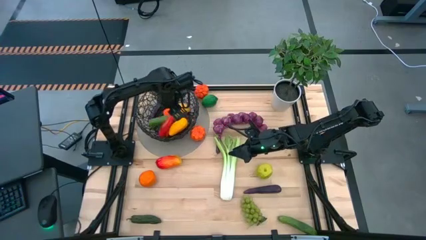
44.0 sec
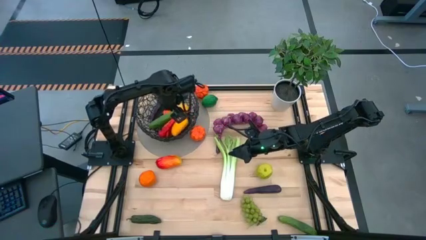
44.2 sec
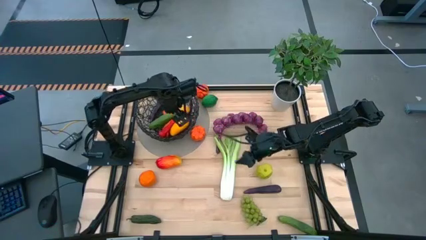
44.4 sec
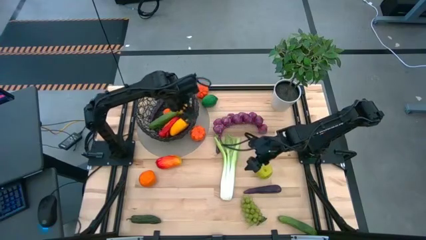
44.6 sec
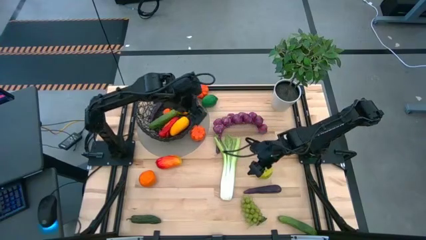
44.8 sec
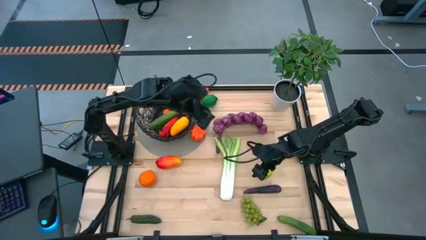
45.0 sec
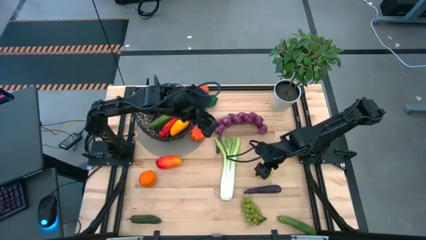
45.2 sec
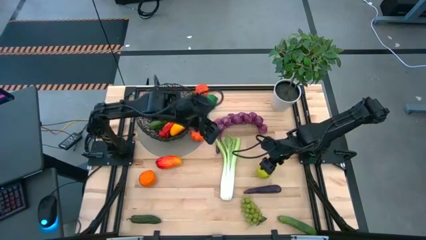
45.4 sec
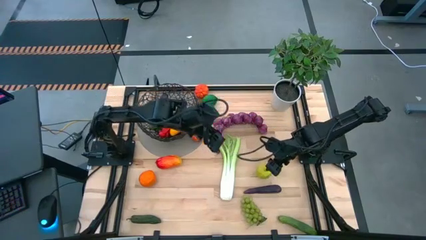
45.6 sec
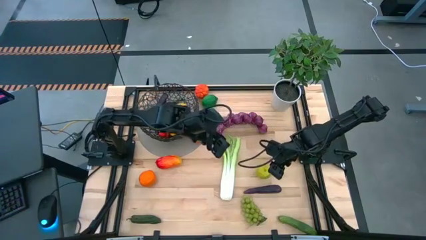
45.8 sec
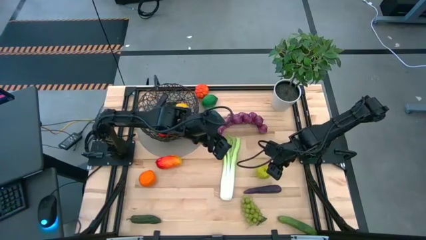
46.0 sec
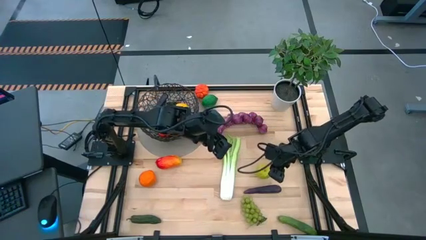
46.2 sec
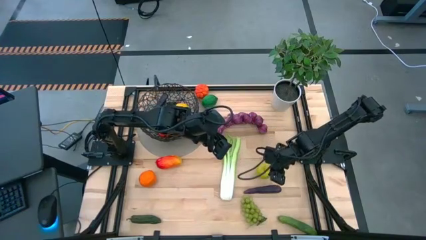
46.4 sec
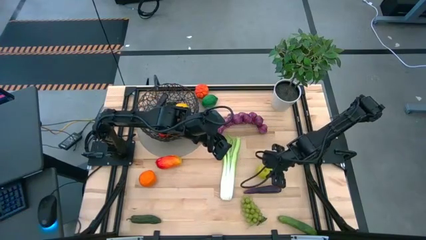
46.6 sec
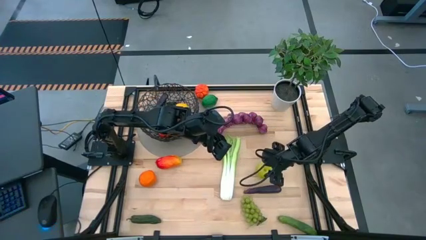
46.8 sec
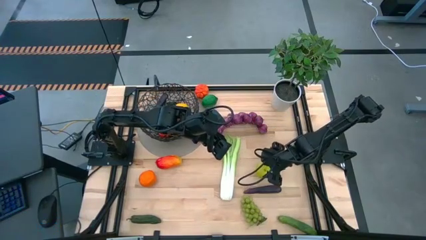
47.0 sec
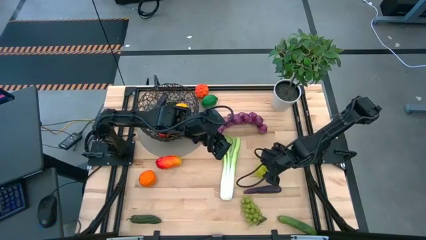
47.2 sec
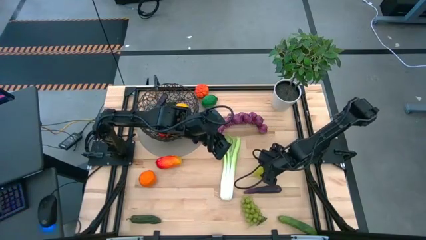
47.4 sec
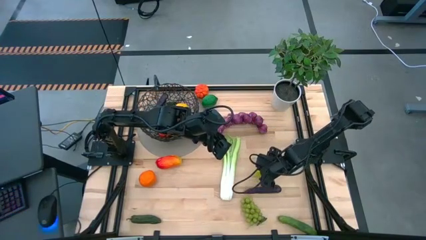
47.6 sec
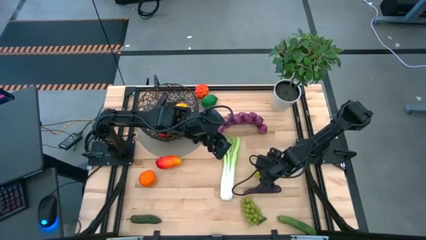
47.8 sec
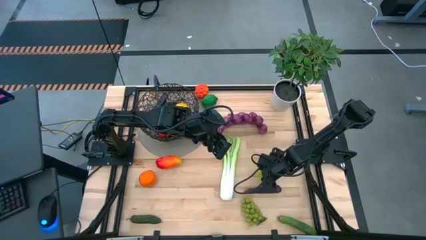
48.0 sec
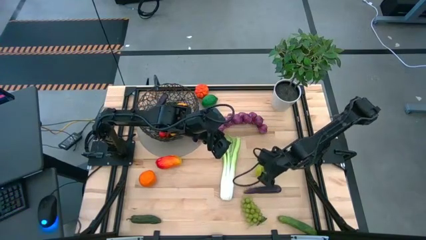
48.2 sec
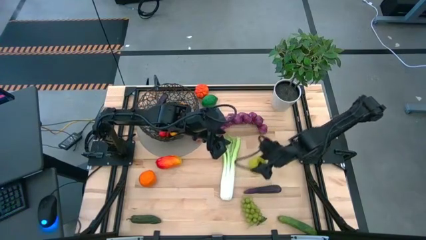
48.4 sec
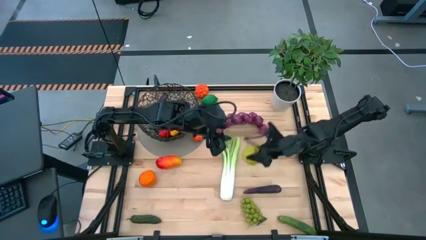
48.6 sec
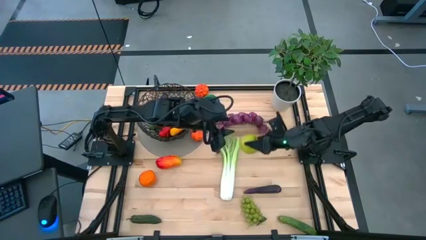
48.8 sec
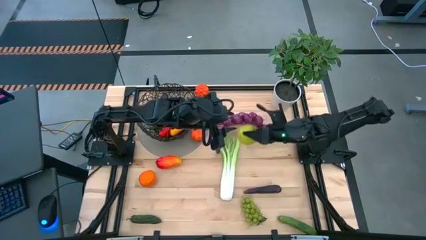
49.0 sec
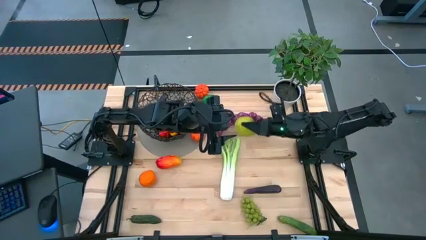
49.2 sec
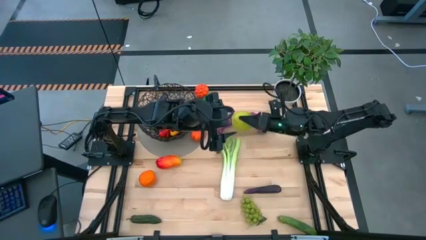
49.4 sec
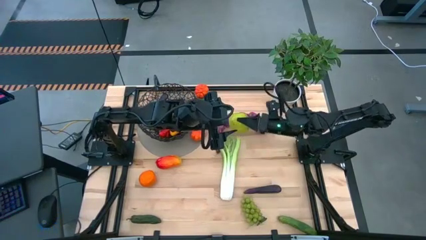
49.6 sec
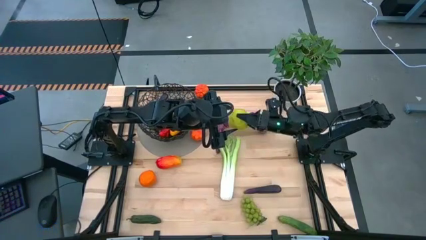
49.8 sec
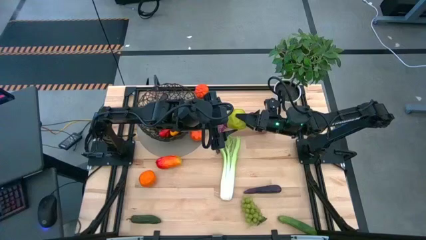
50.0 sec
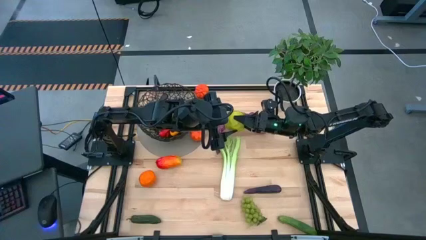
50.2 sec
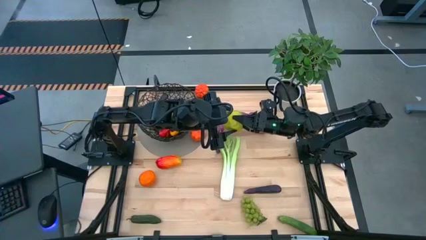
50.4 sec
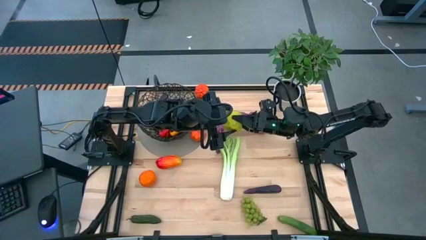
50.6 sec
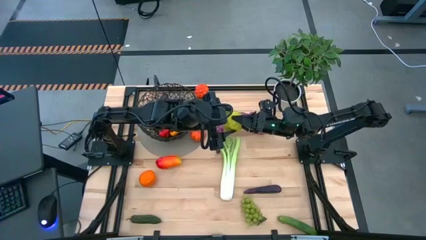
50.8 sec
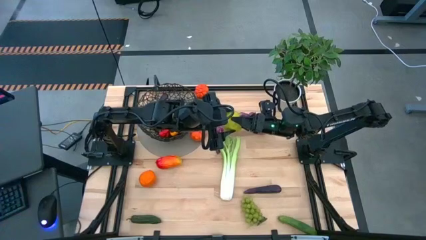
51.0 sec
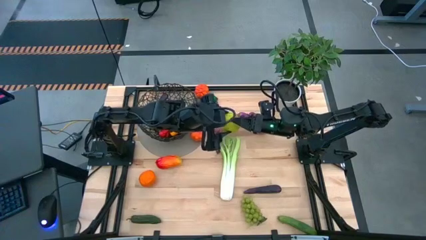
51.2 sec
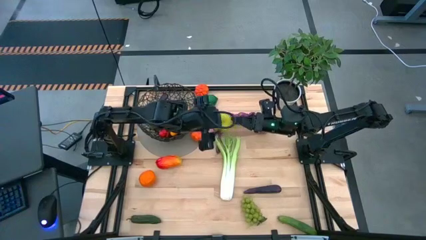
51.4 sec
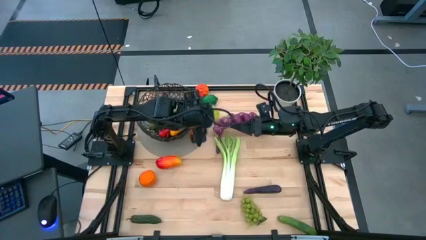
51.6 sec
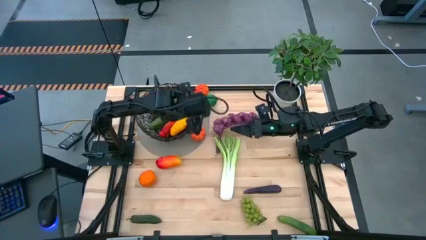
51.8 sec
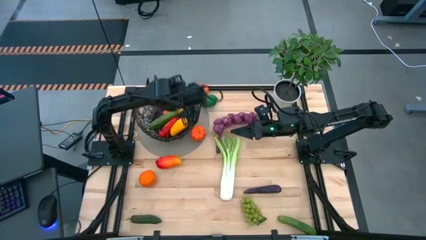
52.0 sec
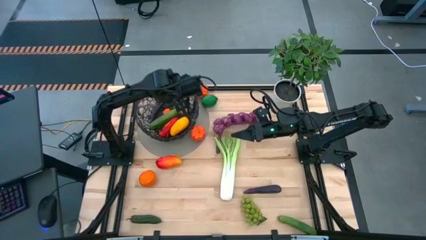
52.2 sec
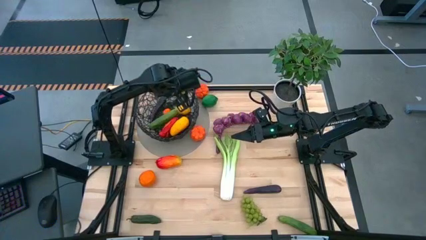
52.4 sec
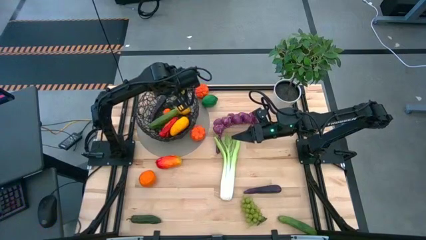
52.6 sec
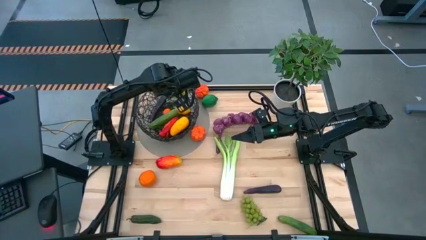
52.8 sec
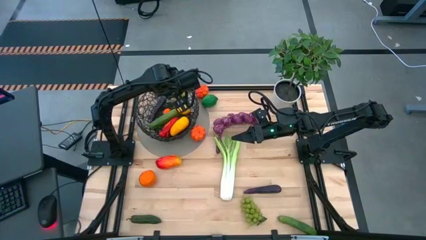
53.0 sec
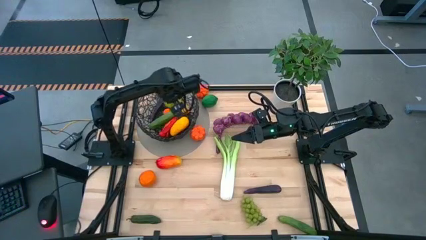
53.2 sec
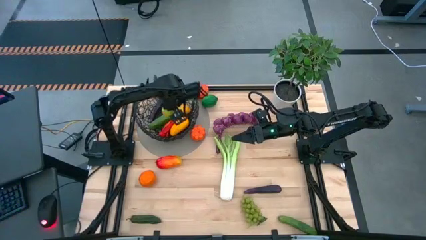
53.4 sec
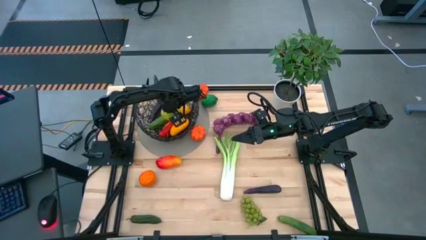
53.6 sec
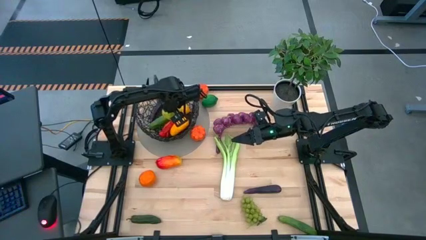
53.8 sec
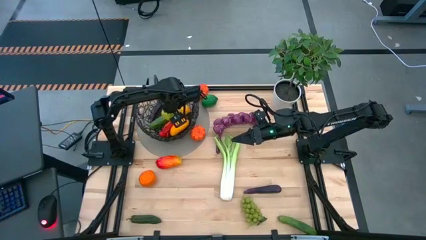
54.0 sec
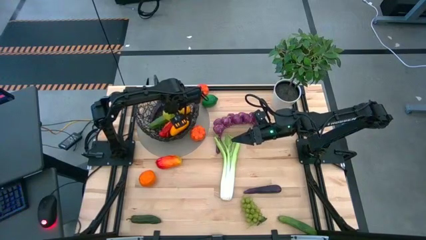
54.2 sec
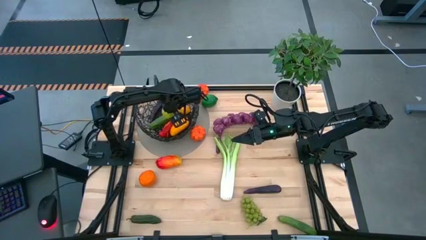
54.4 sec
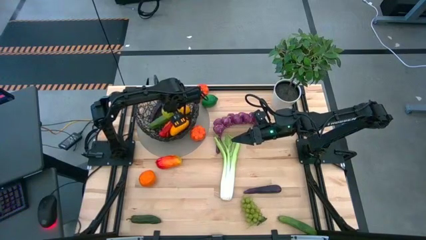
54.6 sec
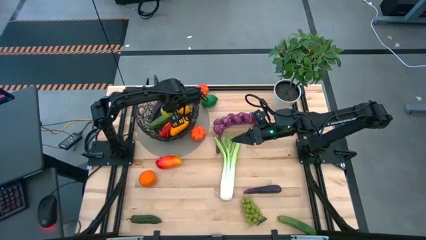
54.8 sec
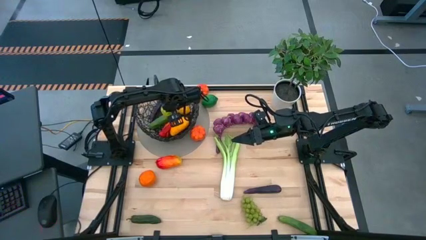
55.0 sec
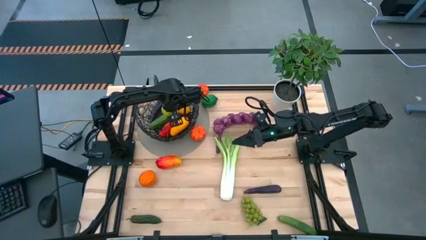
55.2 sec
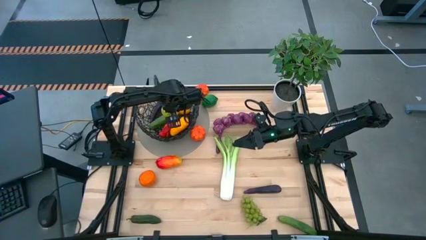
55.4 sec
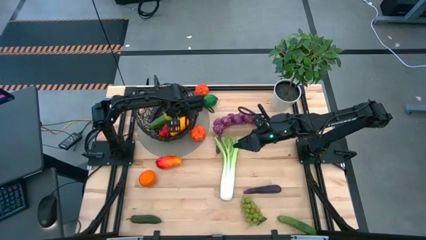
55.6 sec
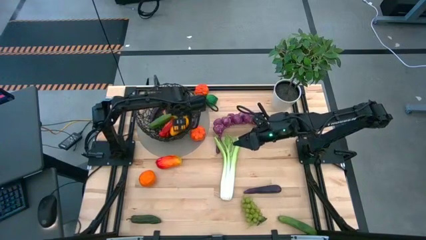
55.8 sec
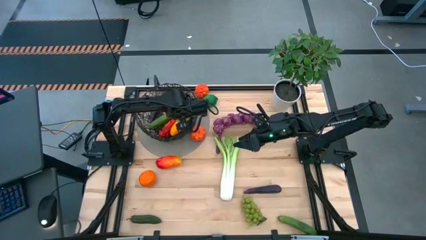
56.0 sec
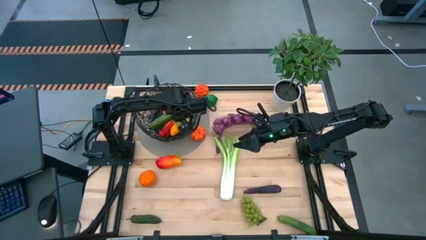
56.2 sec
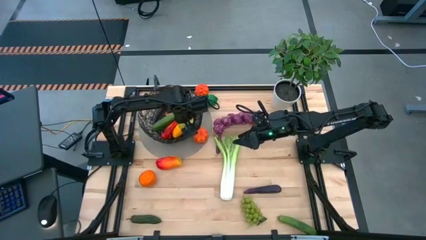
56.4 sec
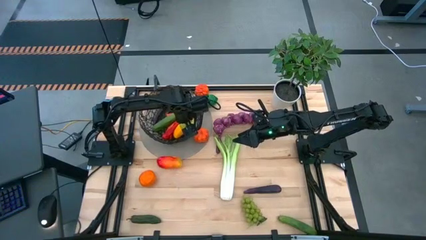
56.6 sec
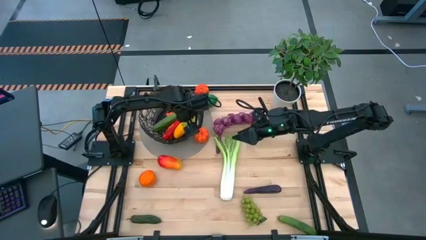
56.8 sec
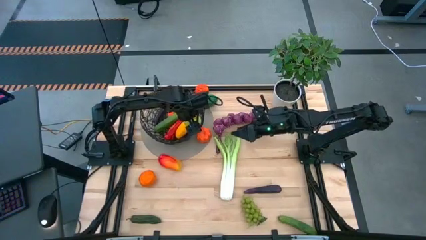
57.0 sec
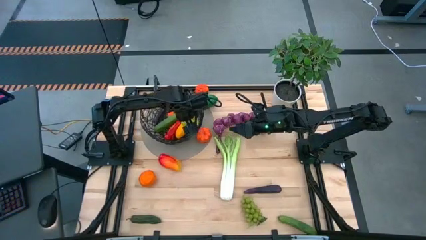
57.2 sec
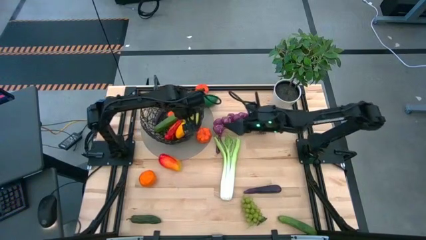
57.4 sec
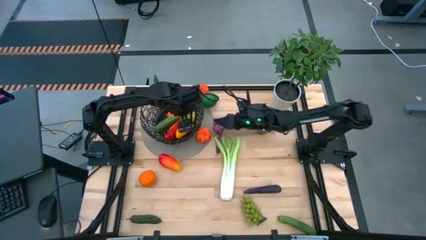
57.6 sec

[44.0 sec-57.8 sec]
Task: Build produce basket
Put the green apple into the wire basket

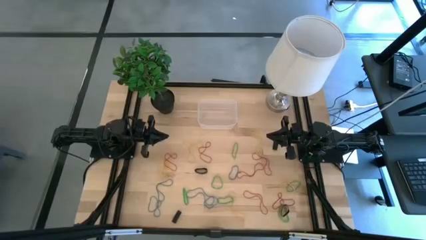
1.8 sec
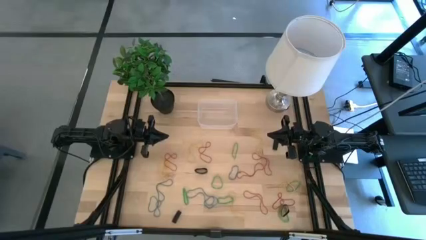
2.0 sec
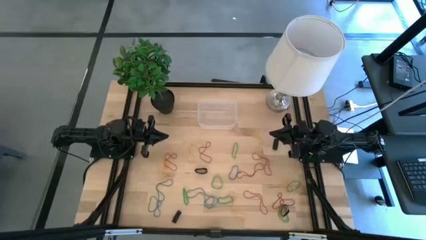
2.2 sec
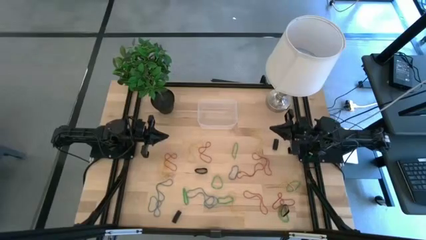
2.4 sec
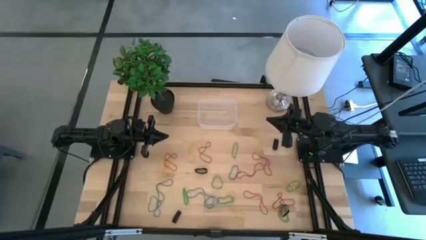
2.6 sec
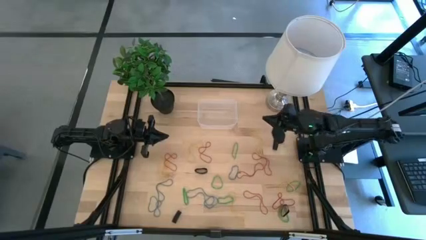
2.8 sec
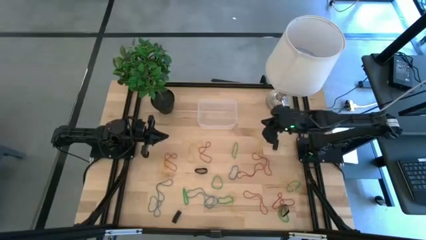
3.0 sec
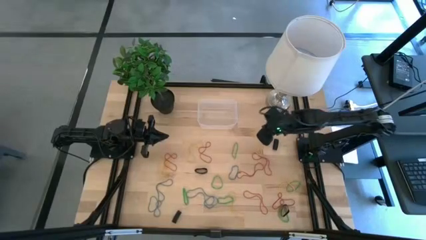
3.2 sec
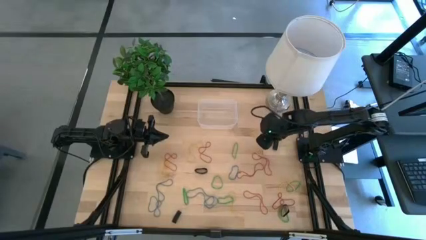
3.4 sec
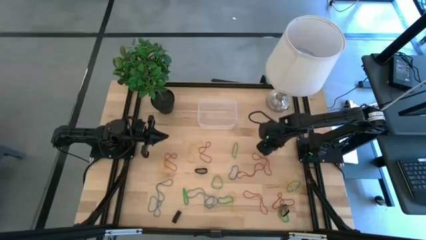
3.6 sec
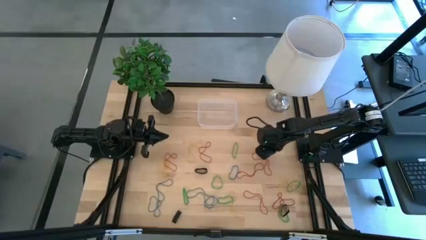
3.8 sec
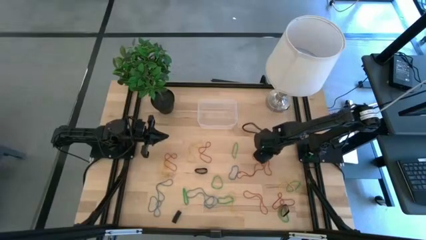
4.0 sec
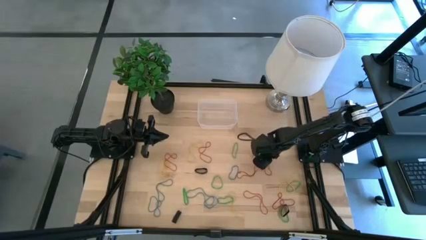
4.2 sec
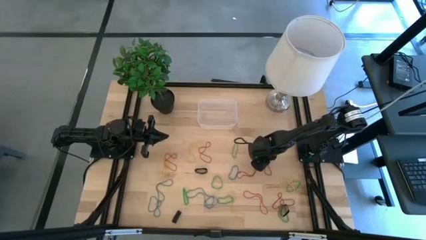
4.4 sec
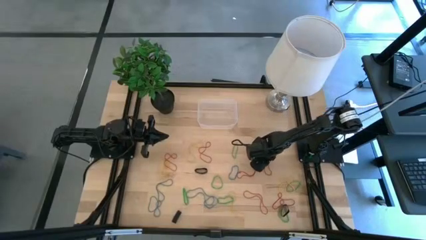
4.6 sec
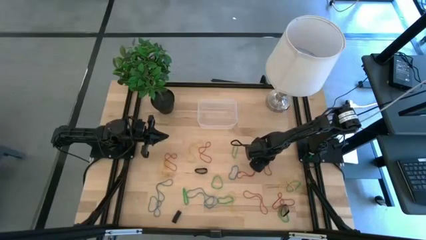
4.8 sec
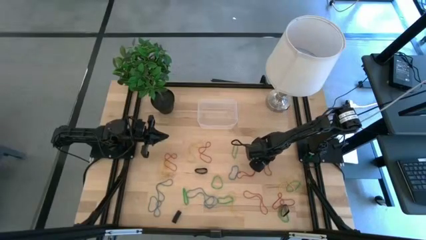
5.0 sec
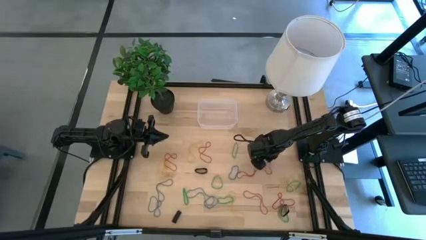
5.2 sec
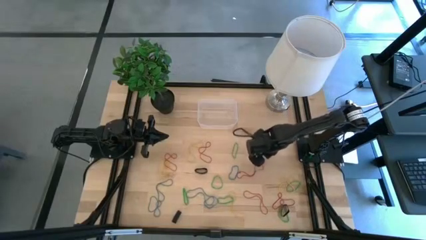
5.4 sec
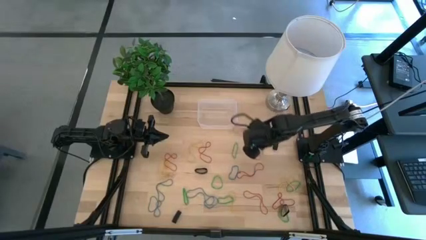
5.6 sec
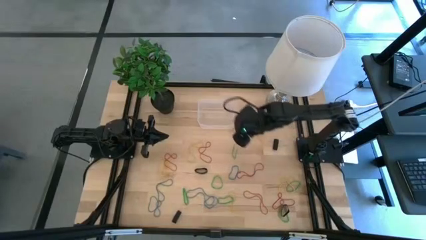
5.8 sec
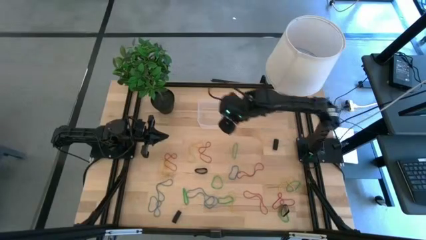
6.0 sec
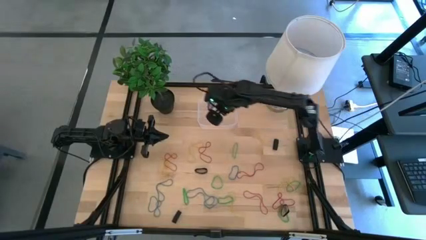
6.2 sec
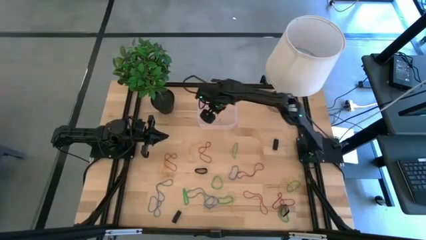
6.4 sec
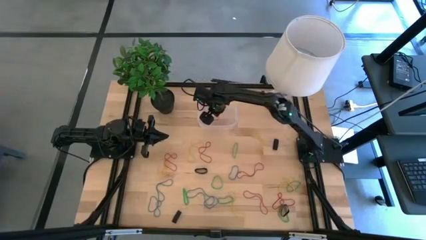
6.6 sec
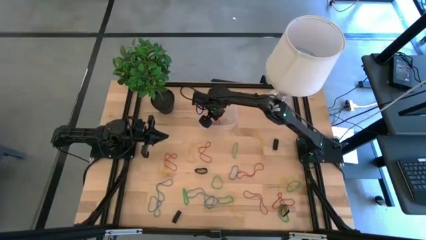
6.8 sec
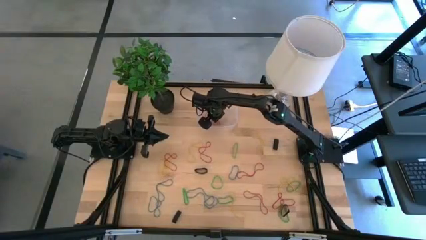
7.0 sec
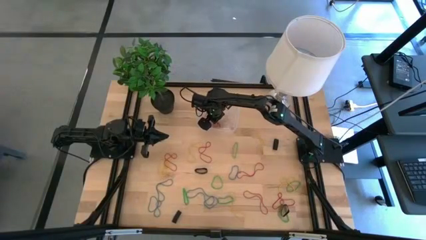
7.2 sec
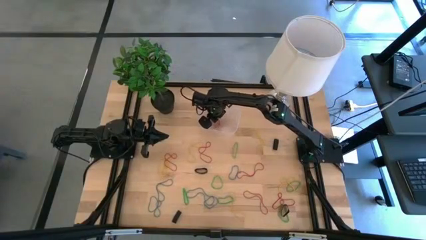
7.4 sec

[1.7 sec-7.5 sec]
Task: Pick and place rubber bands into bin
Put the red rubber band into the transparent bin
